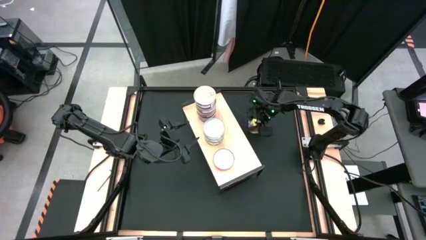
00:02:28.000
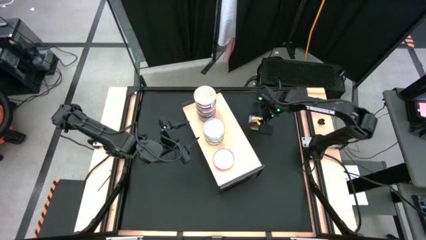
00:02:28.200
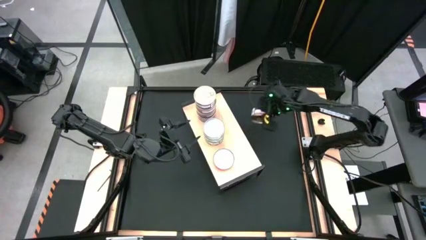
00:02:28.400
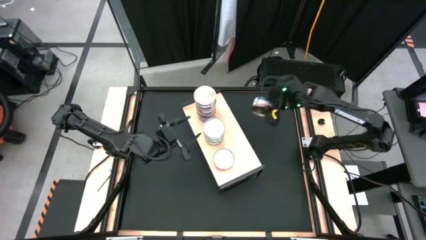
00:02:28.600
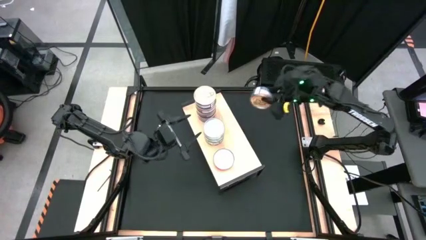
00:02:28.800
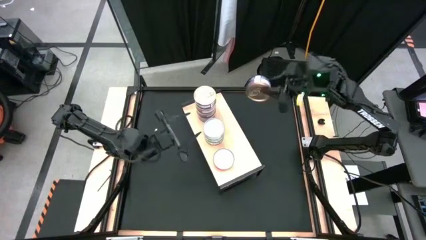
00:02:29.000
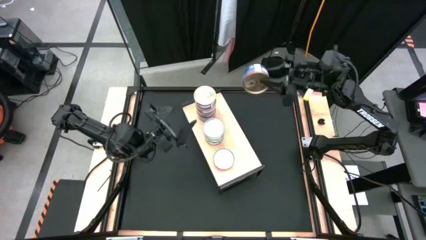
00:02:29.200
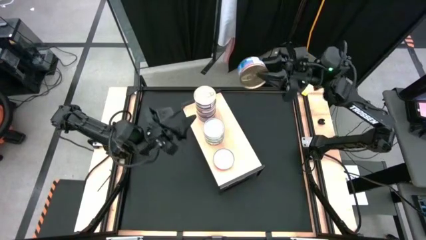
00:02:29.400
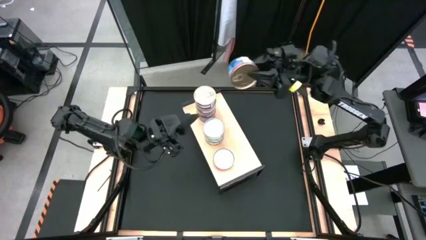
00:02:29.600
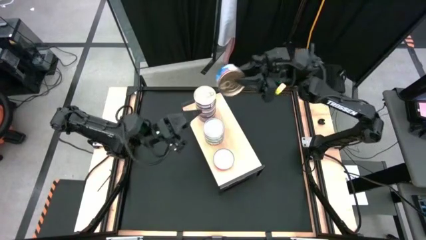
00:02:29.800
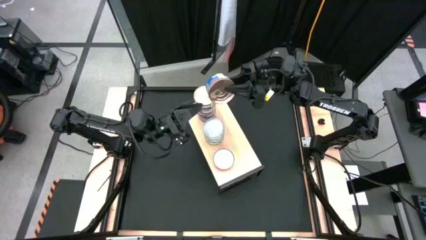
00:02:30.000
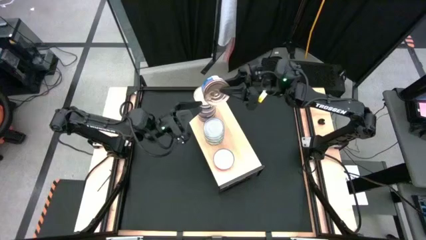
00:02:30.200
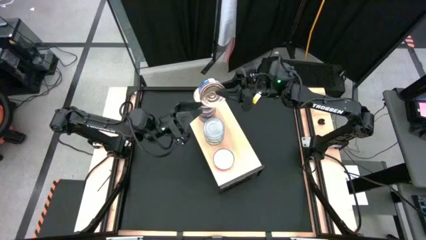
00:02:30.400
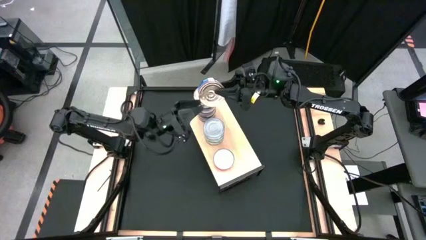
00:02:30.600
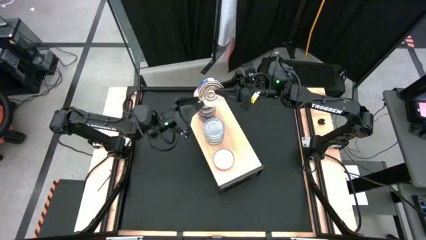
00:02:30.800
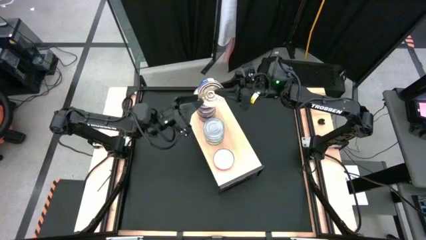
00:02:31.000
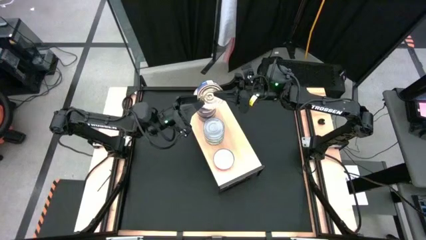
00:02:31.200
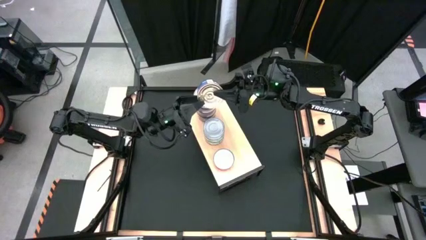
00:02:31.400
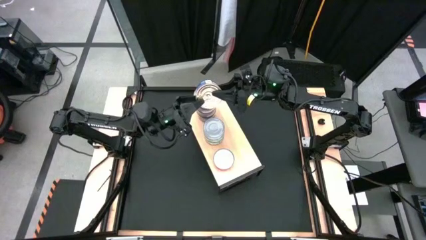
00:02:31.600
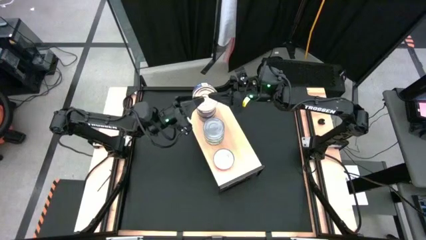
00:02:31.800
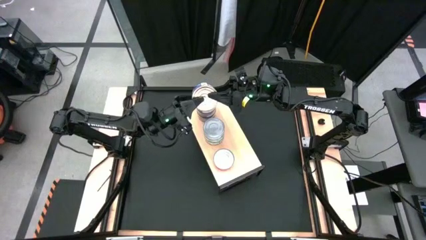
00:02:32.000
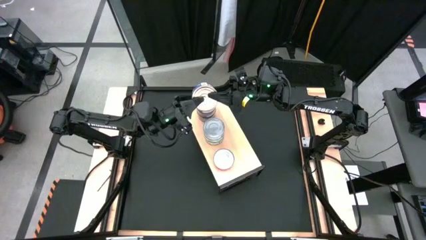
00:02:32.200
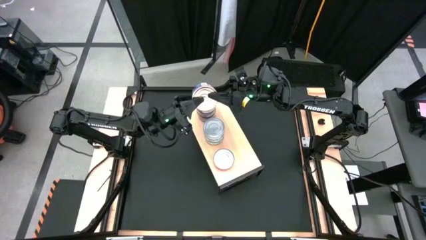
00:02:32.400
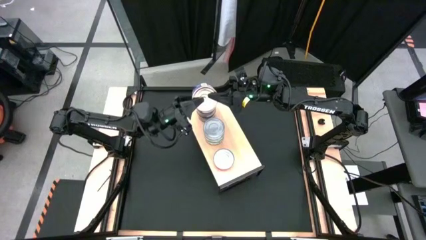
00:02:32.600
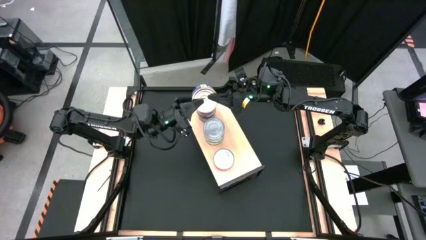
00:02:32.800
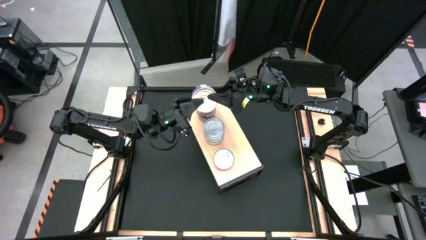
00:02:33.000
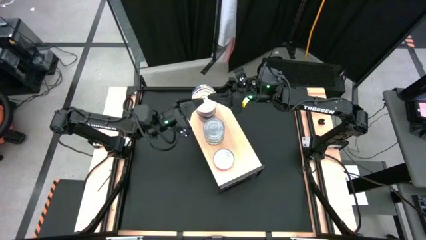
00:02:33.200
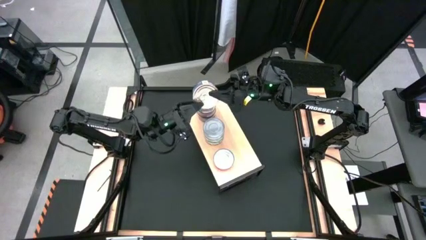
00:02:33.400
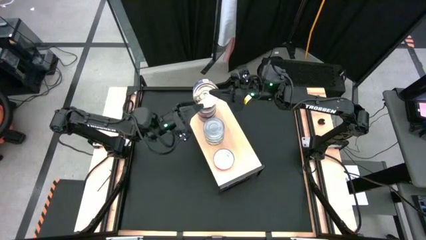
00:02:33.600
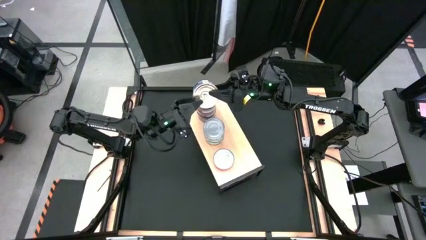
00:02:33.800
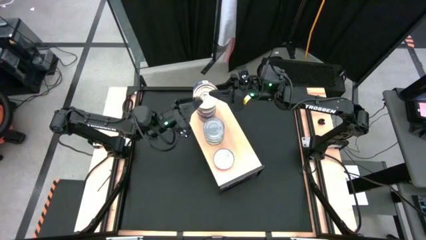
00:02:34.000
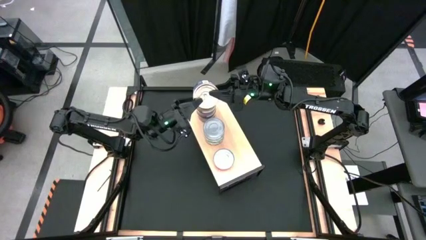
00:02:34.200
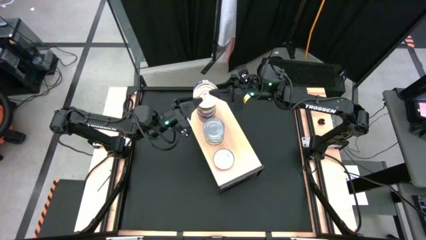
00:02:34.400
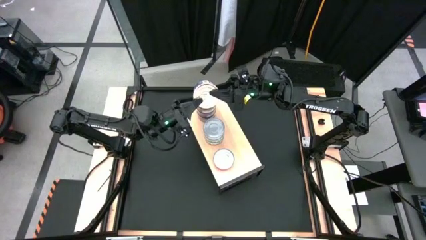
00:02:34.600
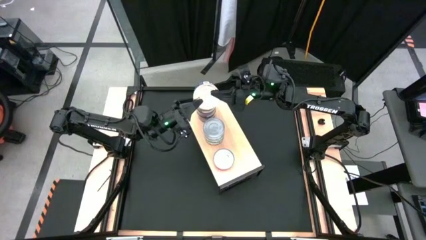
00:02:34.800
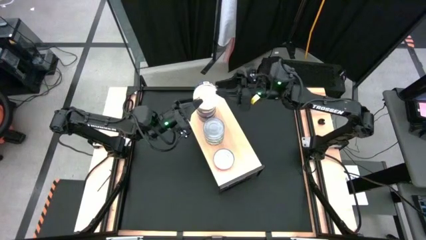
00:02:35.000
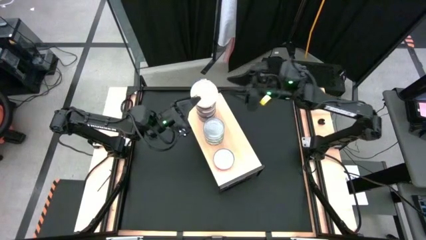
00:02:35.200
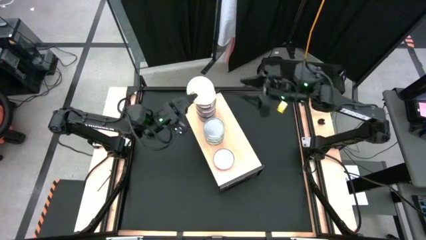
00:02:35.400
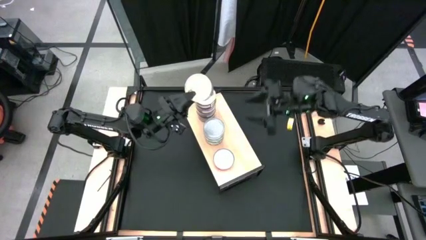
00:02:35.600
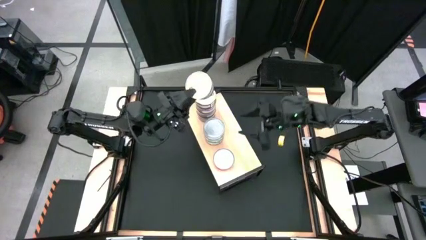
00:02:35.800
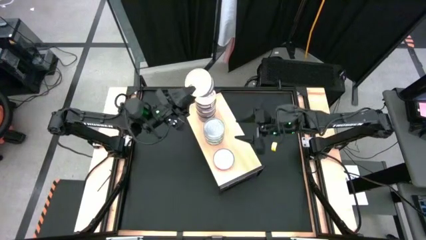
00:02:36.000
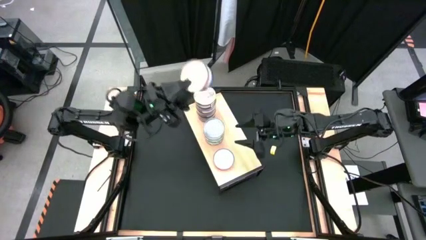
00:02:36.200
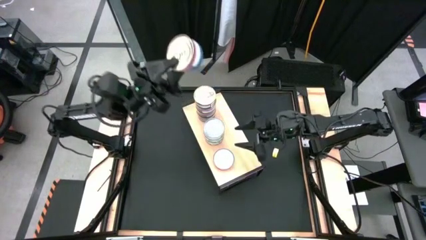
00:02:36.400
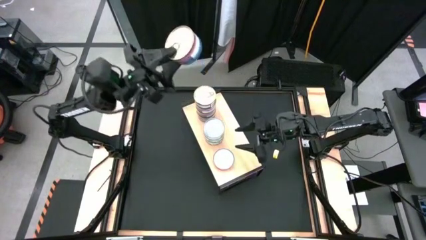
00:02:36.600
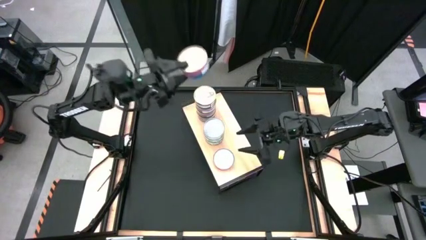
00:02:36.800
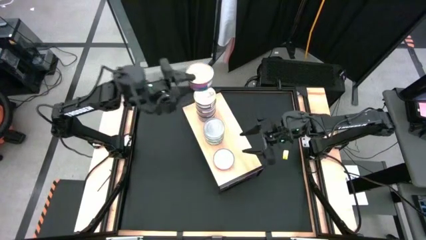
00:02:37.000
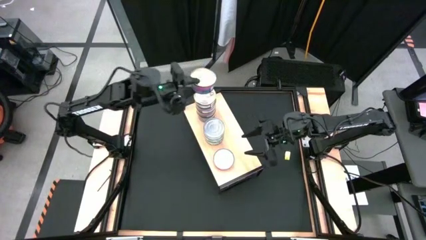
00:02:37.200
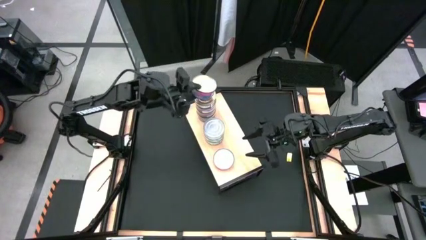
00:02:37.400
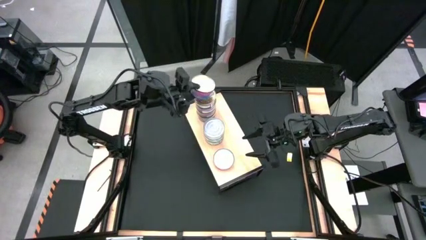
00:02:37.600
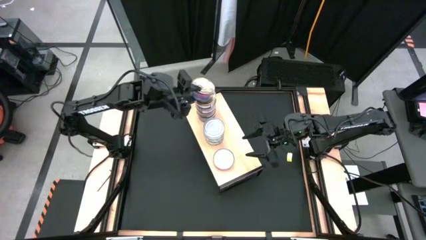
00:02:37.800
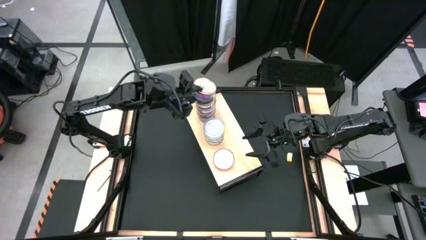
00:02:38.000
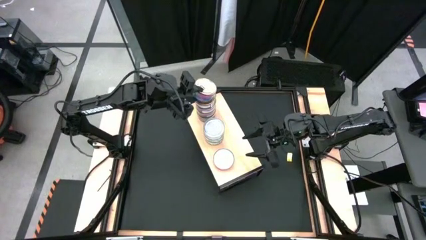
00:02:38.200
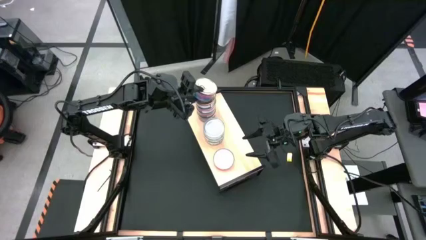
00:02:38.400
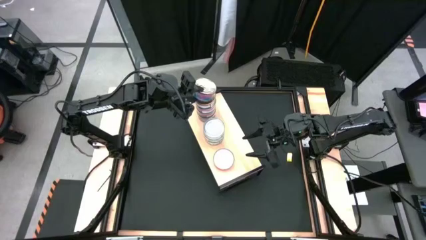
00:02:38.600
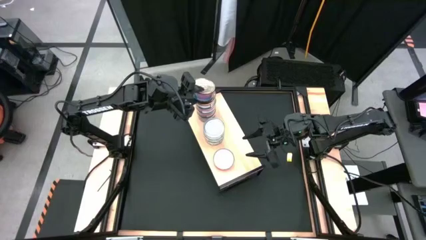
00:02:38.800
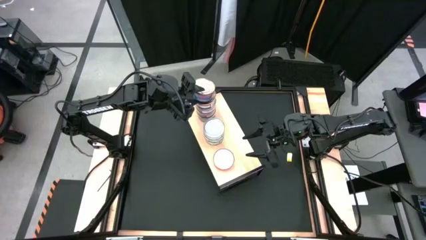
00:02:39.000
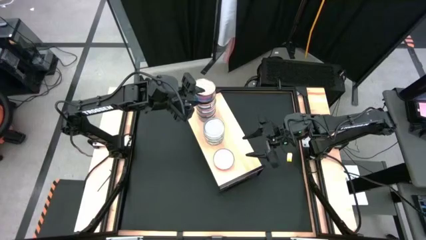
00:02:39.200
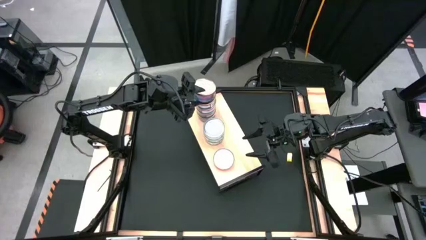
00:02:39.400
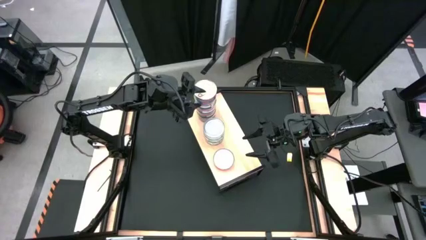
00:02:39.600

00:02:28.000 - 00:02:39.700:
Task: Stack canned seafood by type on shelf
Stack the blue pink tuna can on top of the blue pink tuna cans on the shelf

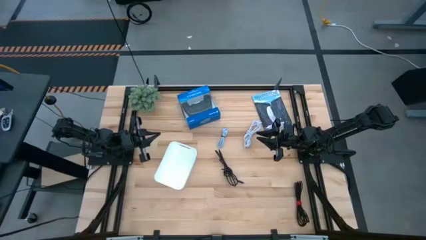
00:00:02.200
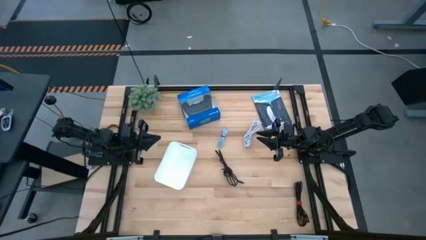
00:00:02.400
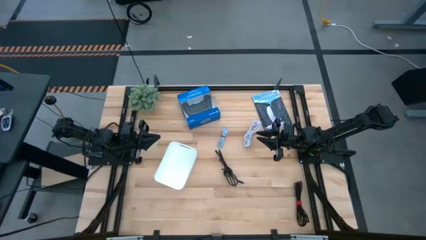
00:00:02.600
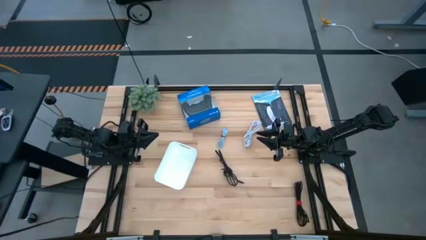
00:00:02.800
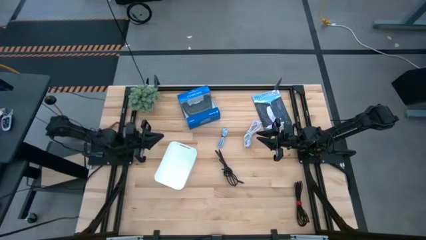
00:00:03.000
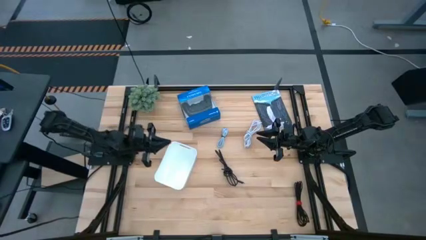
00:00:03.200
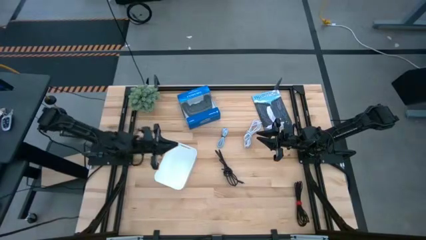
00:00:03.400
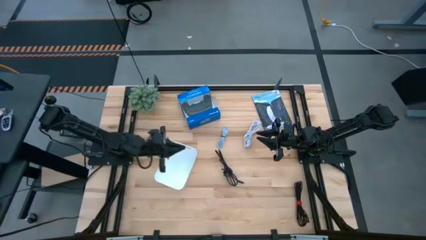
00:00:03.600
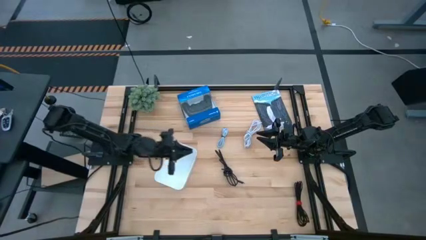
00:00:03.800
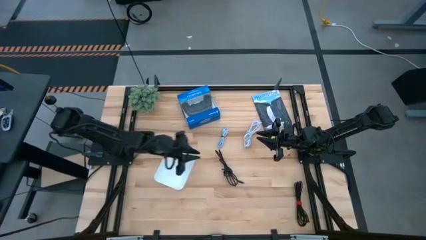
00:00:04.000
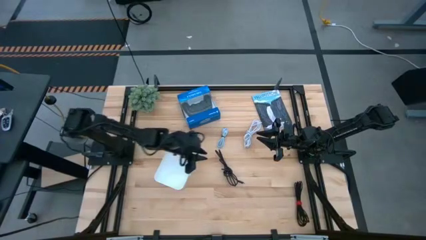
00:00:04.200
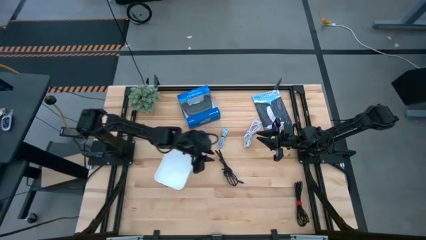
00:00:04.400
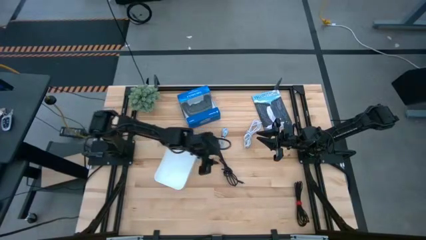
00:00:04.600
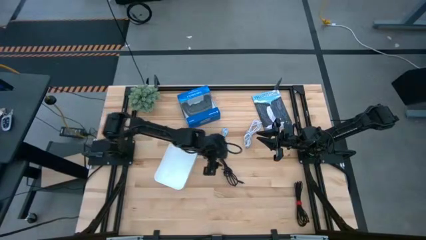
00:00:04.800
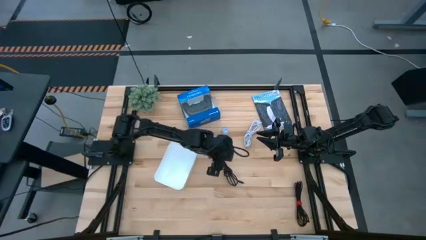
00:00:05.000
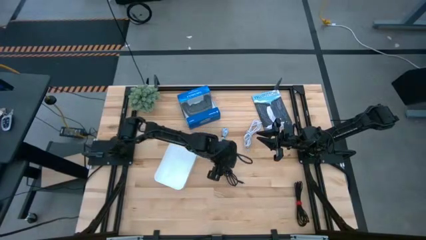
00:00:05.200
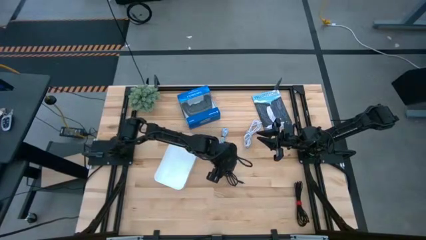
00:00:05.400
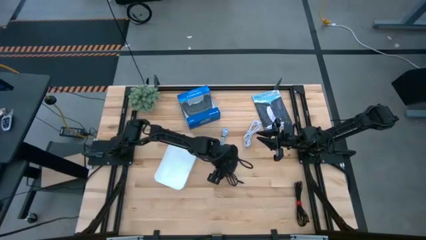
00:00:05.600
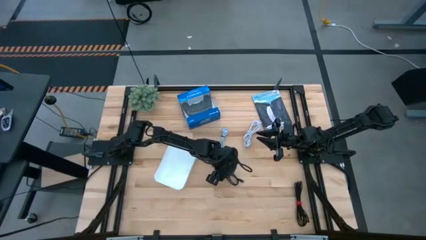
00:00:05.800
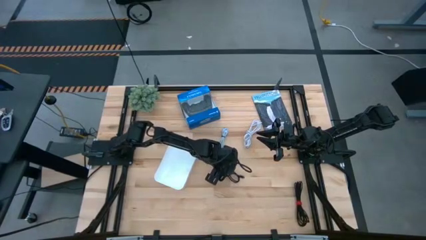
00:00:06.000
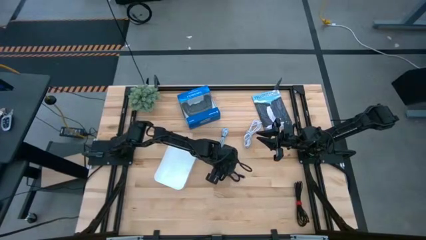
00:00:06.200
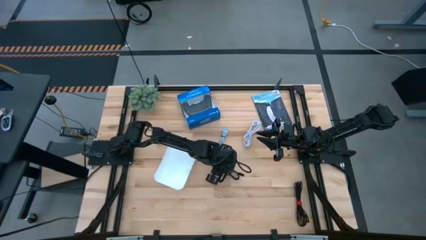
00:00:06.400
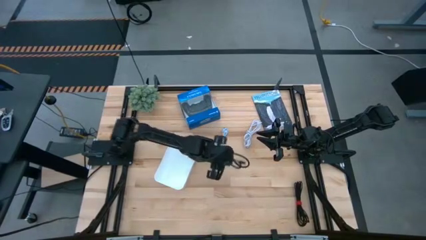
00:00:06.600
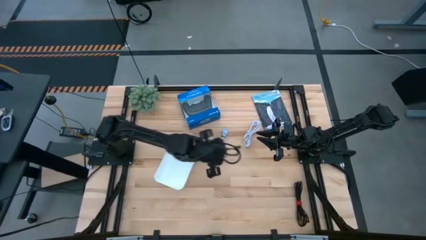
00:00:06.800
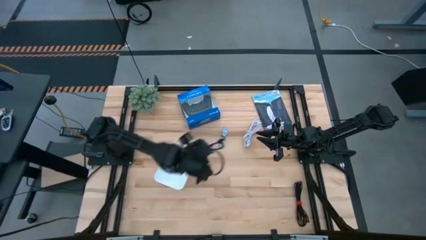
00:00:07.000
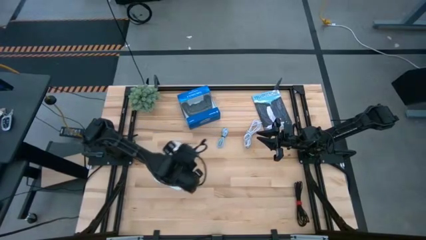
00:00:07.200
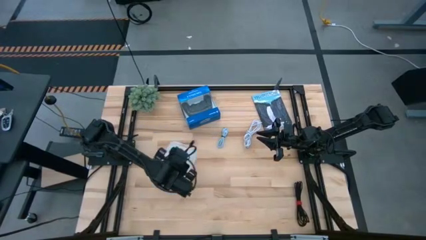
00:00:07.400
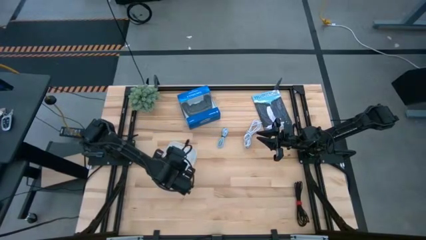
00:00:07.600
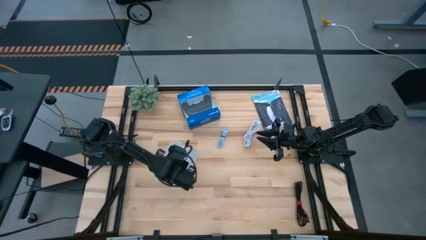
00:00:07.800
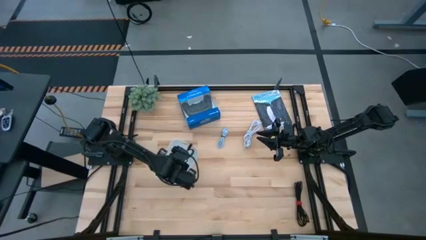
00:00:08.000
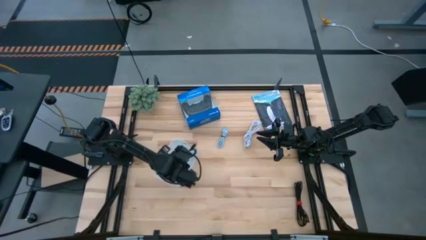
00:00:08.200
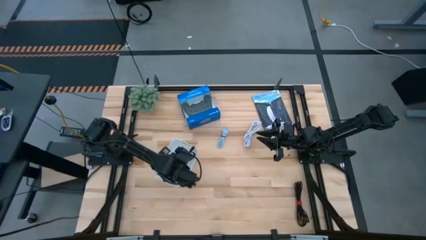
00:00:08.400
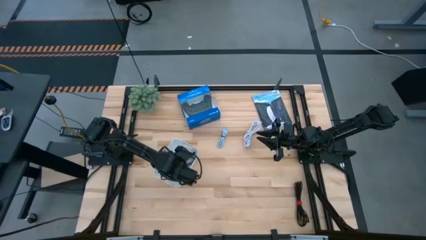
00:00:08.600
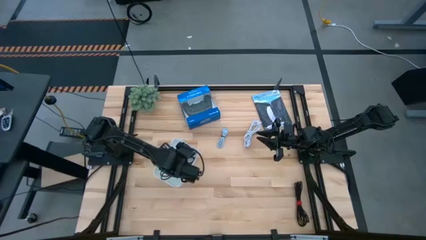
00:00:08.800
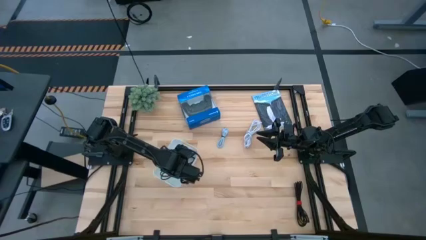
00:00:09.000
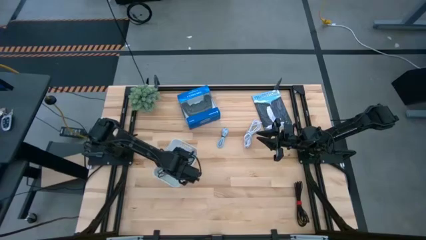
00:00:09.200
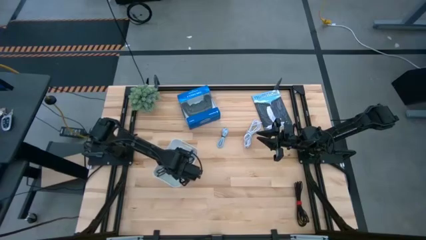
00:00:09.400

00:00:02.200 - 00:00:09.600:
Task: Pick and place USB-C Cables
Put the left black charger cable into the white bin
